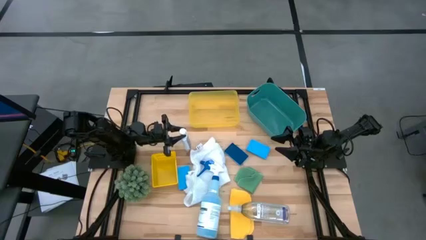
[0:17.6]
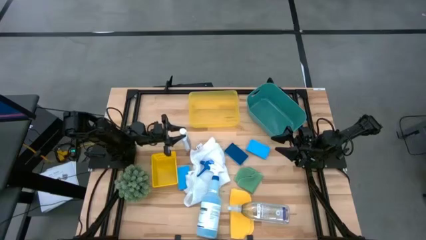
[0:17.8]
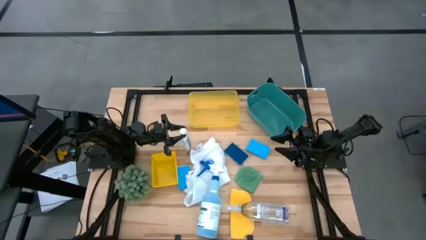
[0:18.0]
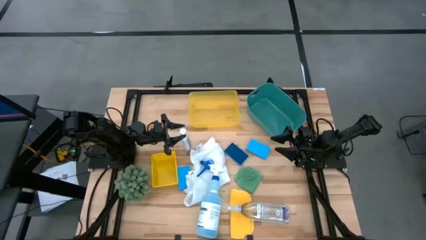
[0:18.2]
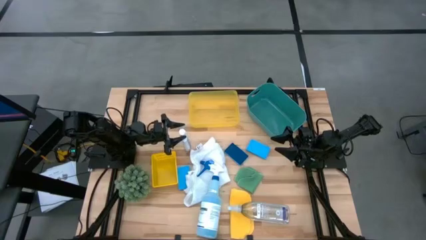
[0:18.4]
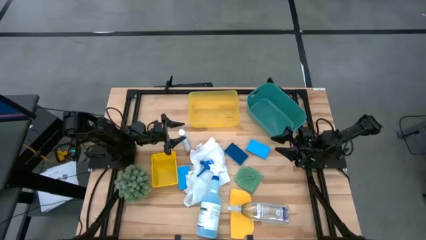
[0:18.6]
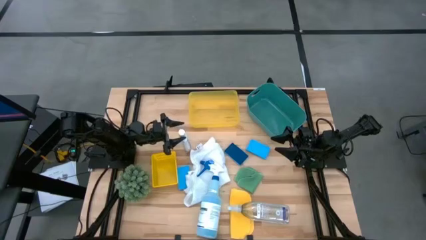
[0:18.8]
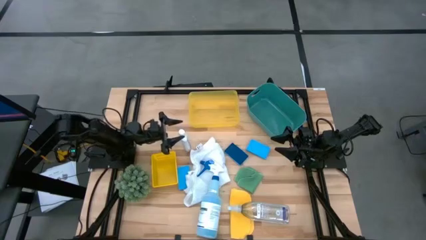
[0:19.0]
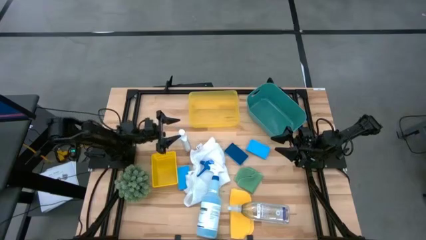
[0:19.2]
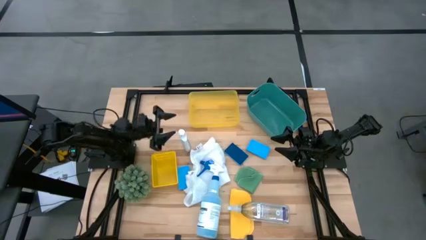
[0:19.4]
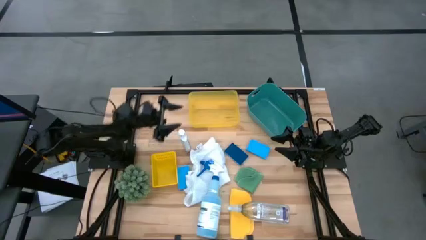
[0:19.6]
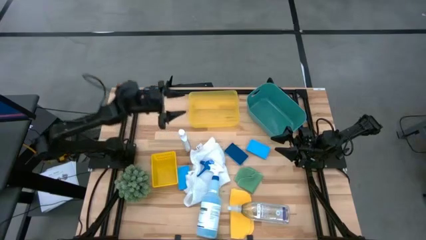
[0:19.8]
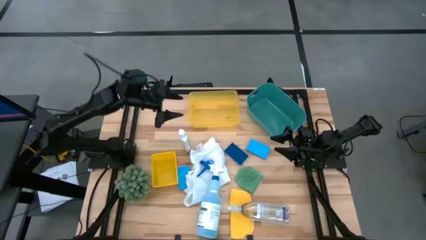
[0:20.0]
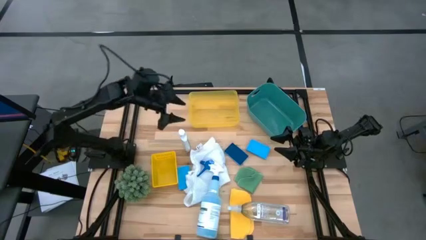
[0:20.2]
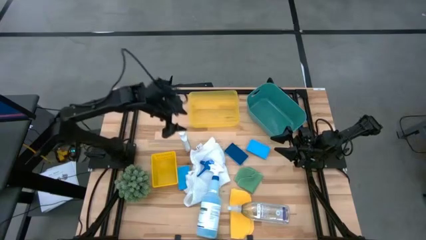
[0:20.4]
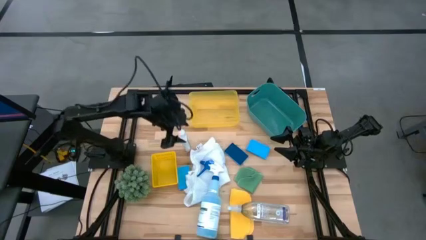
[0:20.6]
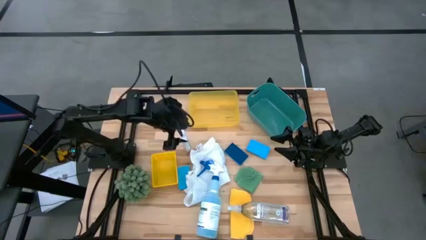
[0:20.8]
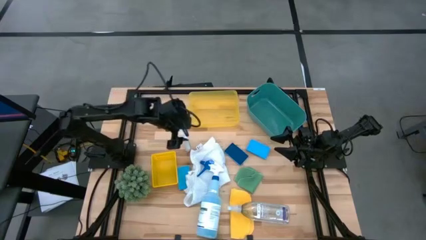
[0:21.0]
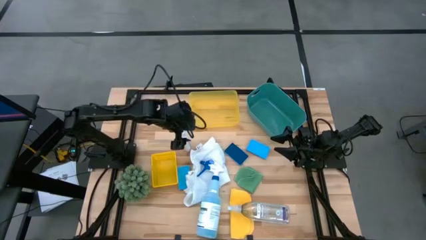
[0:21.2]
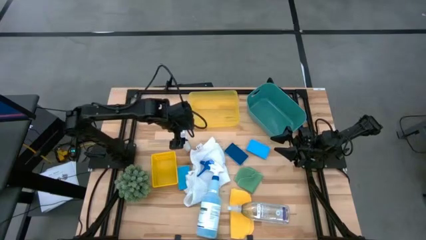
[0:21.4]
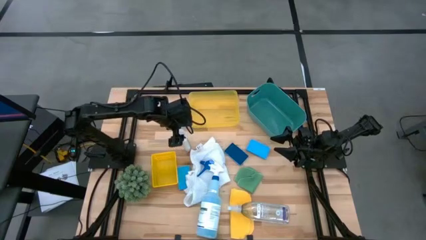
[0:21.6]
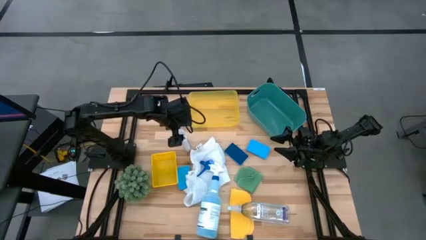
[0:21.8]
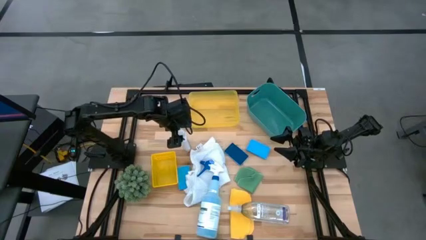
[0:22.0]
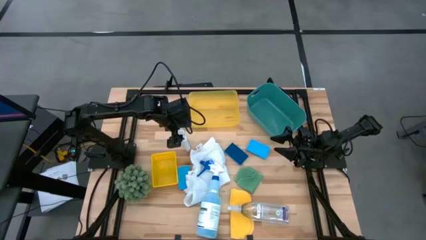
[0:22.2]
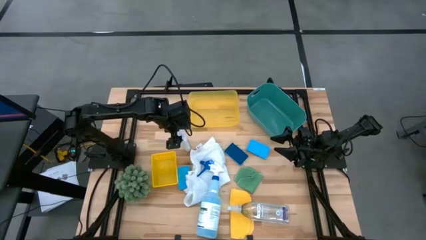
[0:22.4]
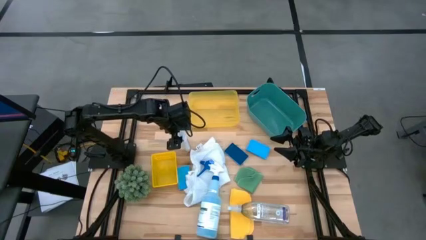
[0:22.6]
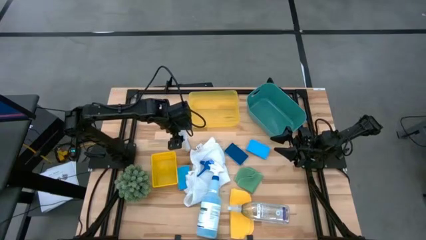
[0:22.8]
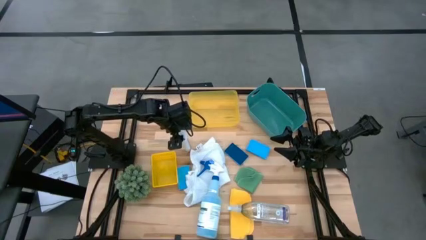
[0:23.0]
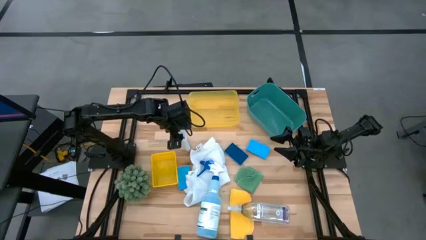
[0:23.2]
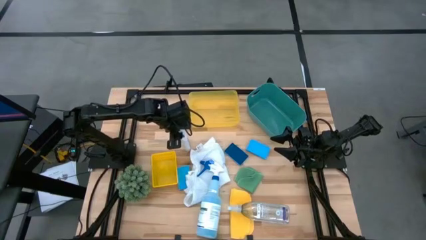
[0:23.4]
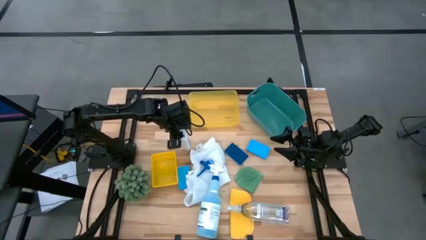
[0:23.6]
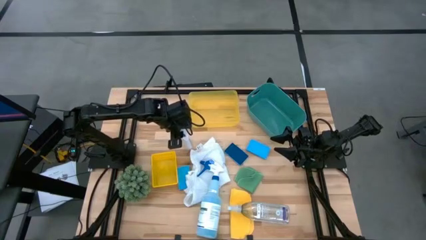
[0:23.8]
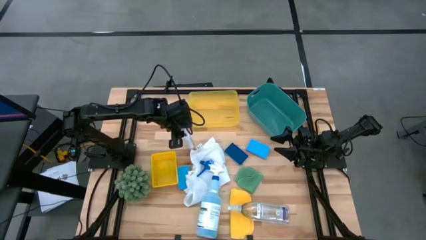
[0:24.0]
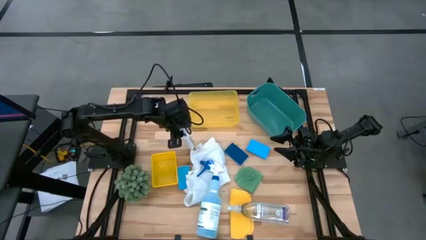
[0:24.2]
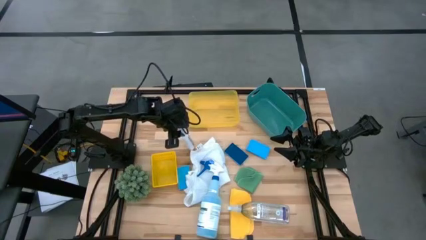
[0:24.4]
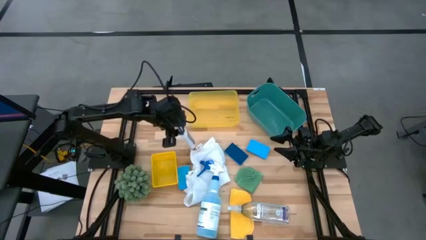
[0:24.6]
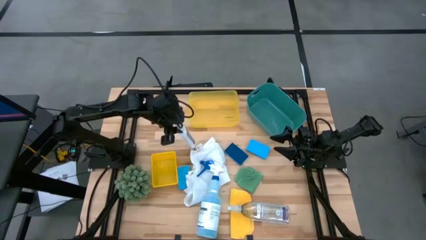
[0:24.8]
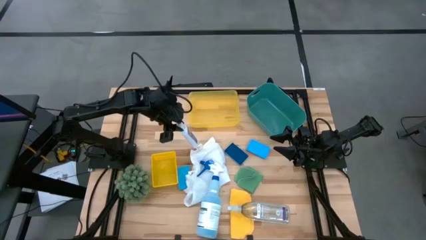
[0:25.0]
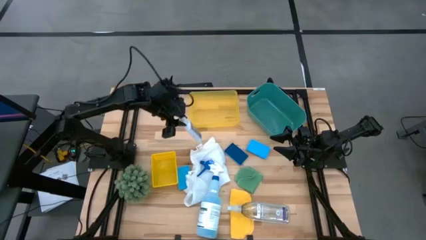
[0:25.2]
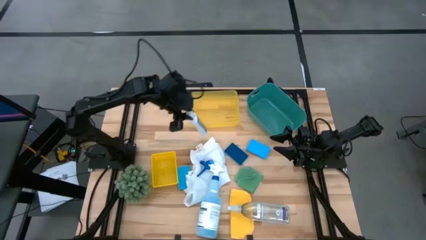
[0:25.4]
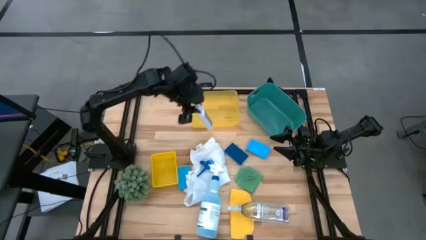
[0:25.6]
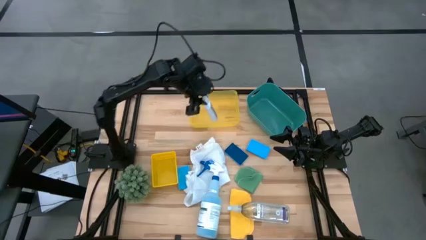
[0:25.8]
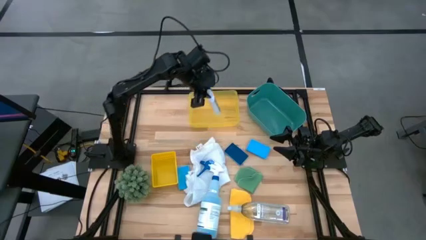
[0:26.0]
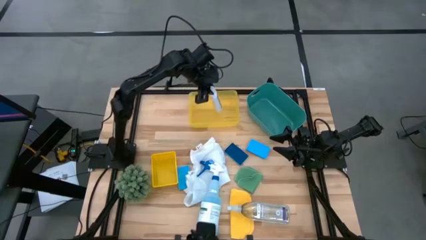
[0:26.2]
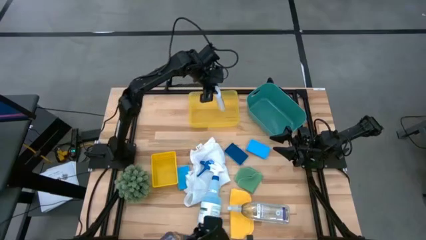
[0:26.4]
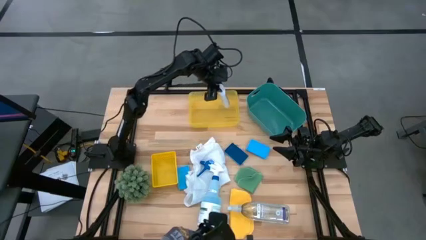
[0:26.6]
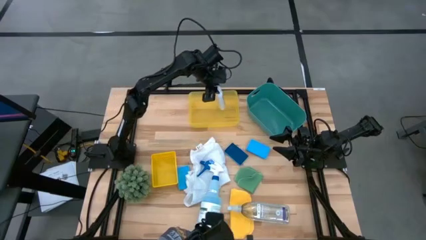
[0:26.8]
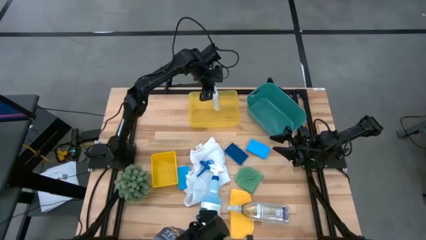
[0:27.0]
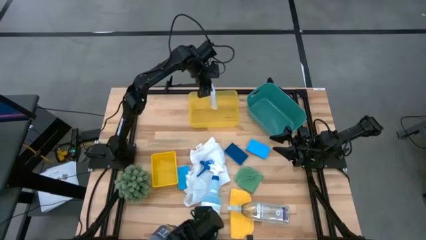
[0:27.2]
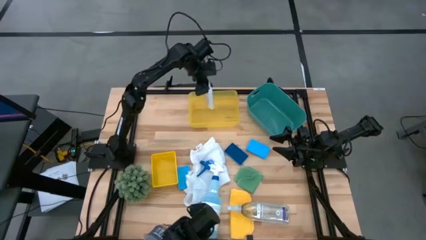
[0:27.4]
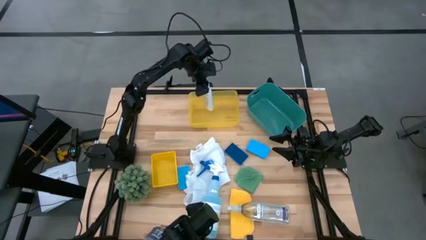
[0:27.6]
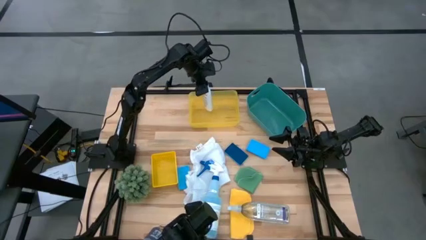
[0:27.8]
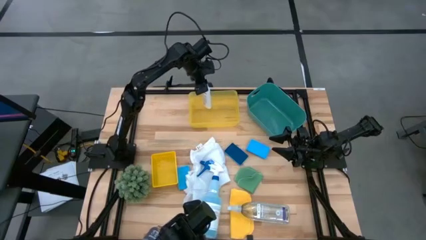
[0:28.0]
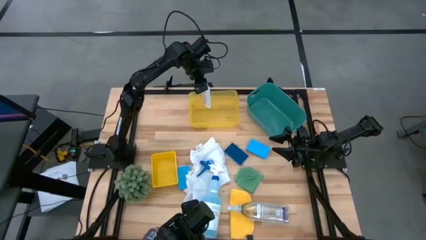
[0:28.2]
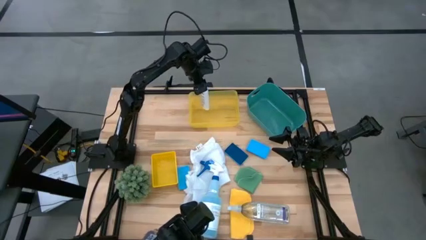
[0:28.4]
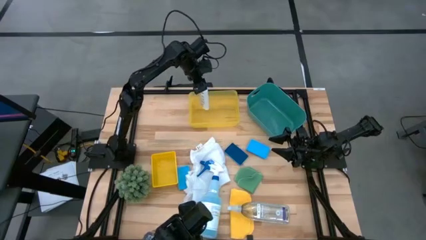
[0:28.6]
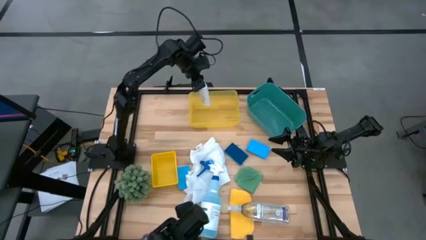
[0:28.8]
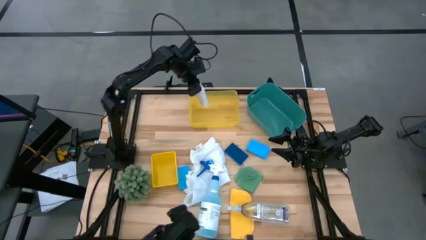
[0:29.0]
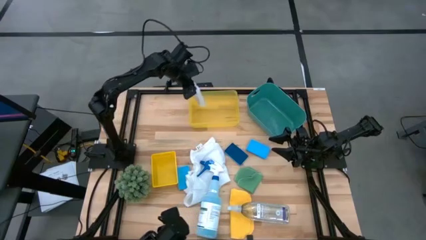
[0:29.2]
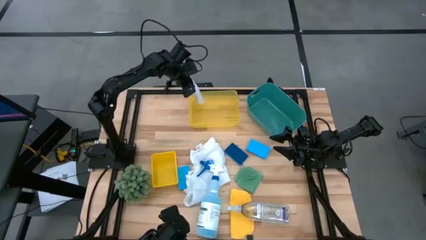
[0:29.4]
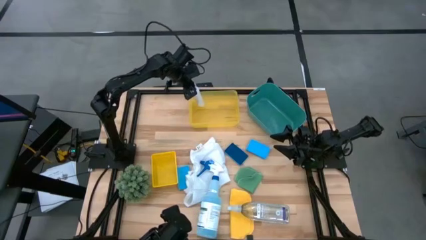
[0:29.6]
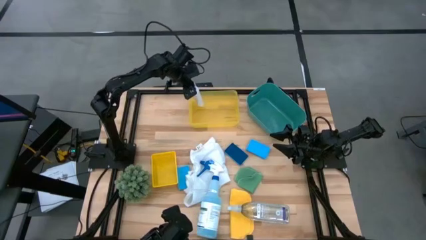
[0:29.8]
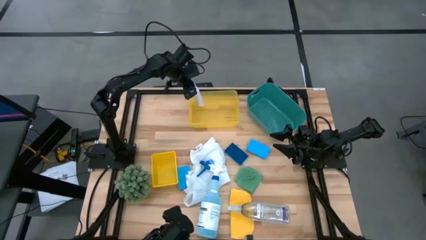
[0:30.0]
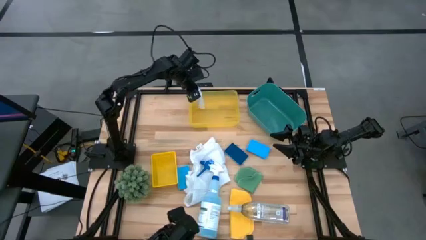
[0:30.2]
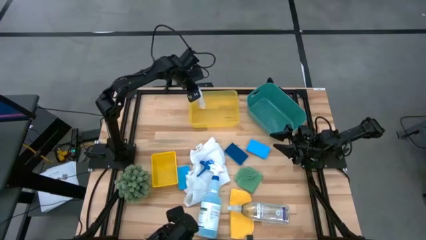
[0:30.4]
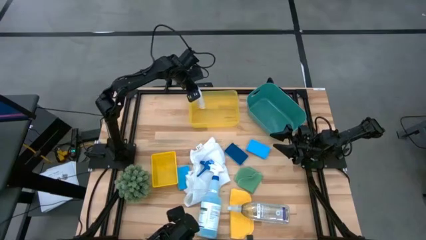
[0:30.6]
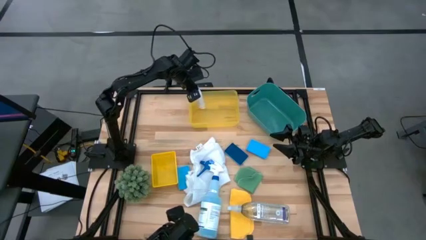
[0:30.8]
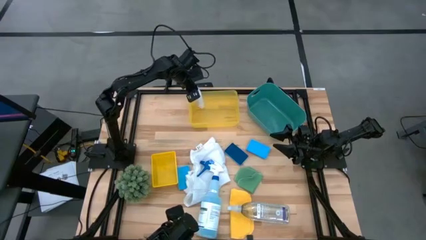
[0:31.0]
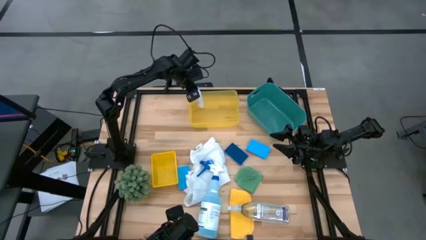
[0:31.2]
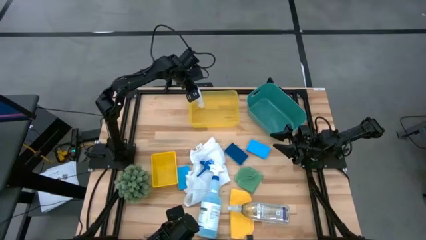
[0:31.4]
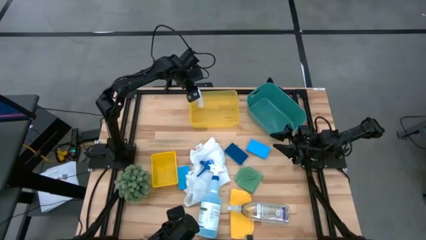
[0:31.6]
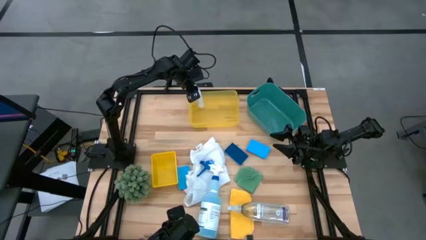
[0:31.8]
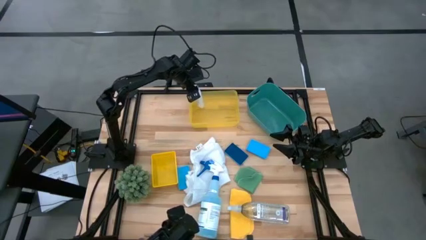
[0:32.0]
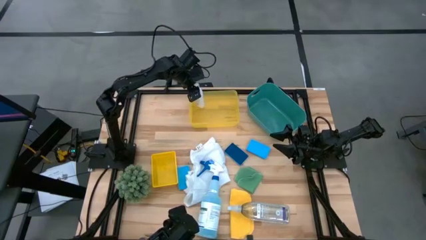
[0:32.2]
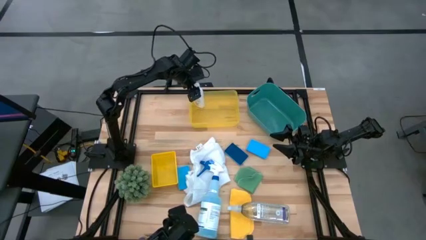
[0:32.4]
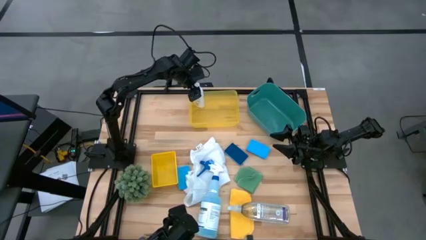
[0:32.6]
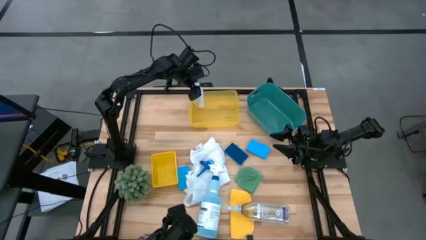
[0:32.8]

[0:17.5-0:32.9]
Task: Pick & Place Kitchen Items
Put the white cleaning bottle into the top yellow bin
